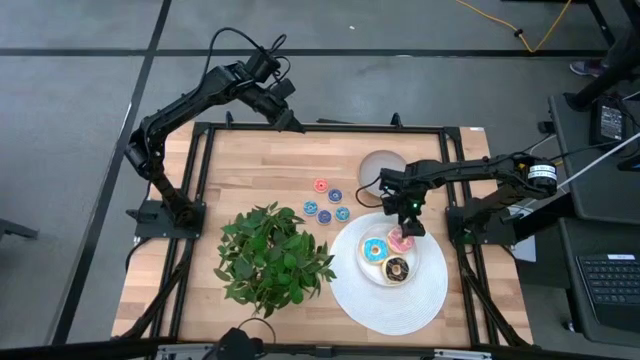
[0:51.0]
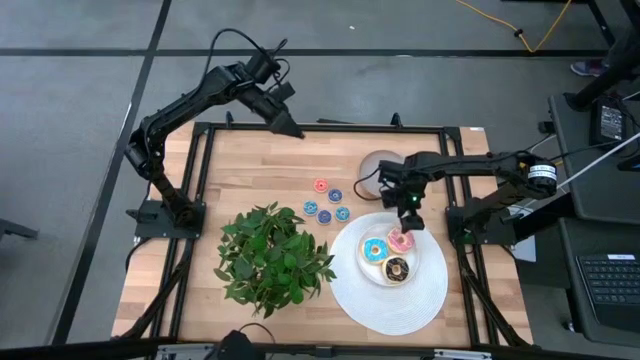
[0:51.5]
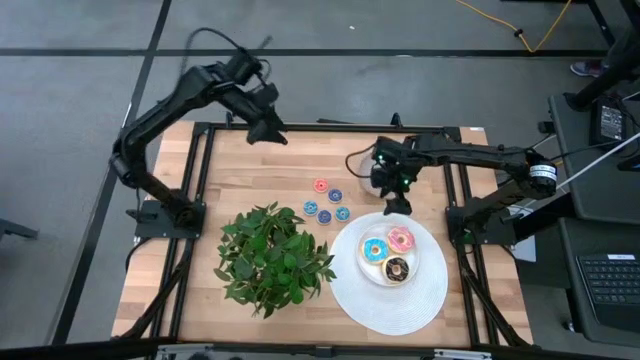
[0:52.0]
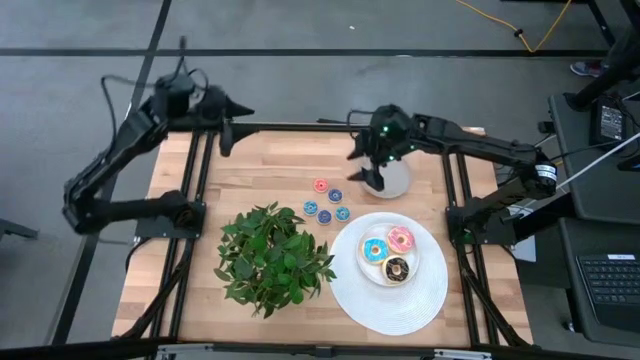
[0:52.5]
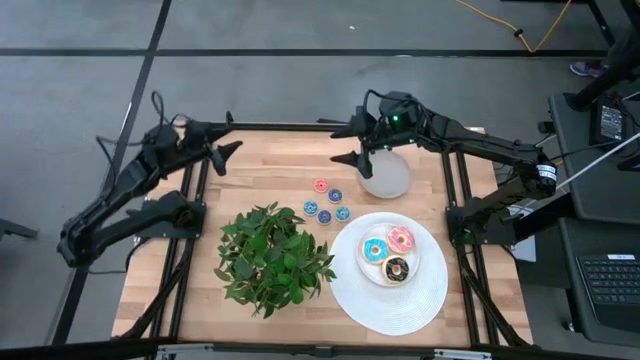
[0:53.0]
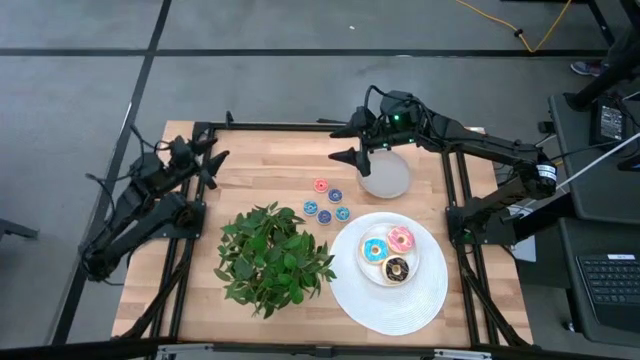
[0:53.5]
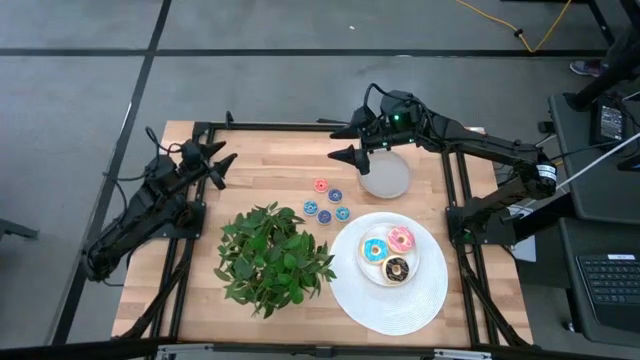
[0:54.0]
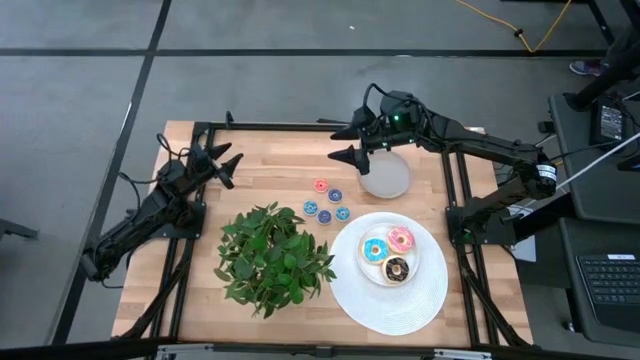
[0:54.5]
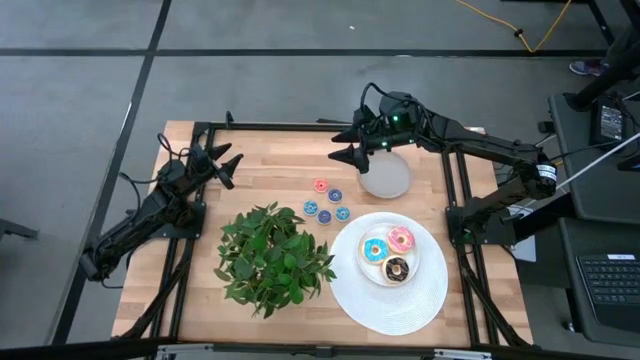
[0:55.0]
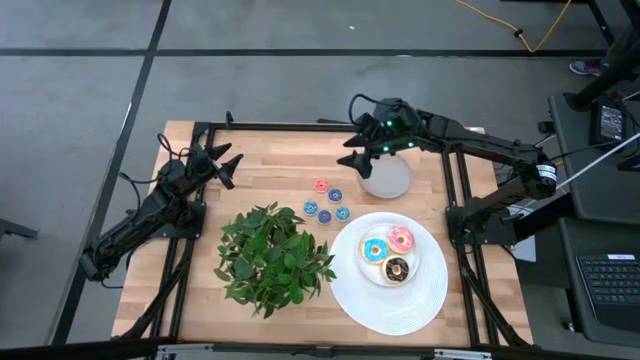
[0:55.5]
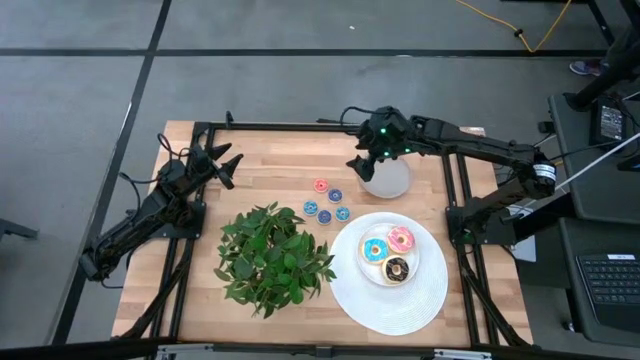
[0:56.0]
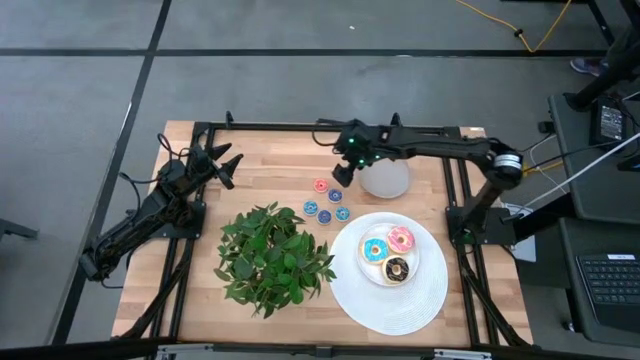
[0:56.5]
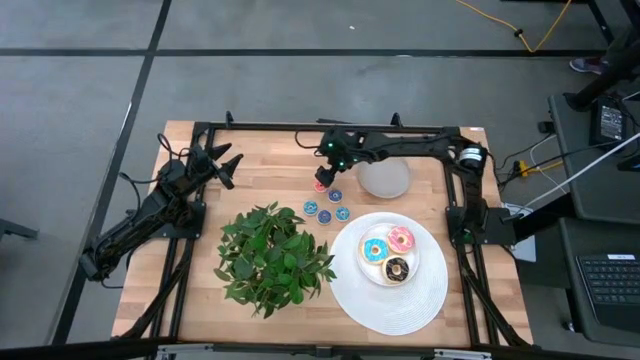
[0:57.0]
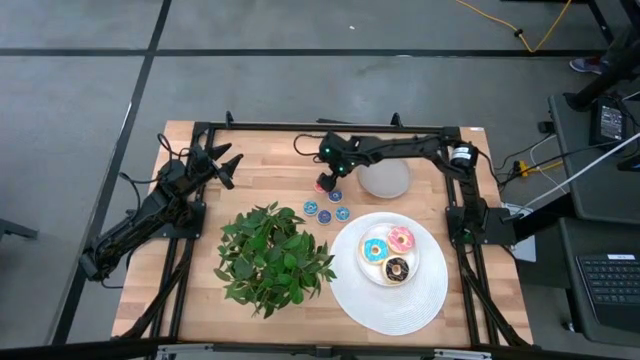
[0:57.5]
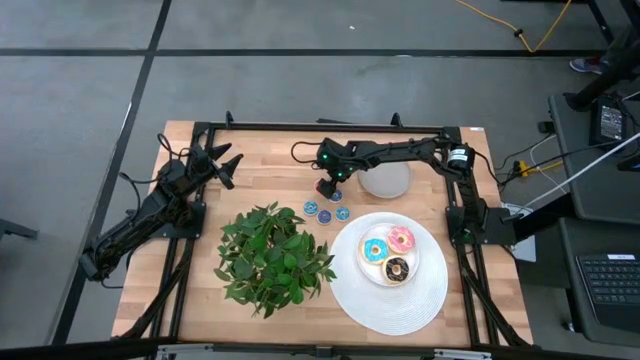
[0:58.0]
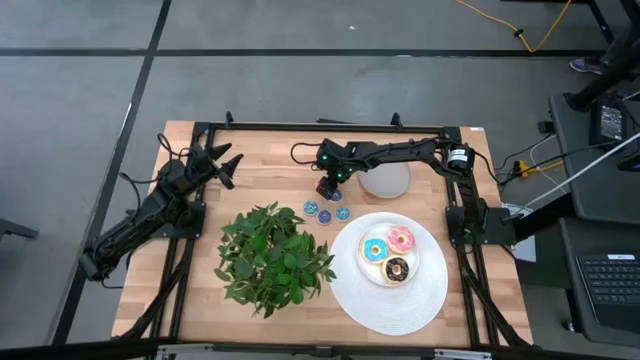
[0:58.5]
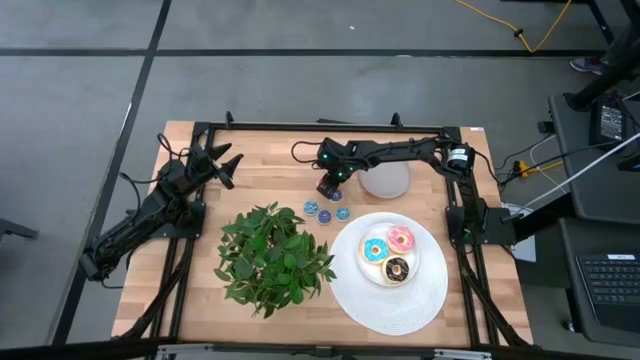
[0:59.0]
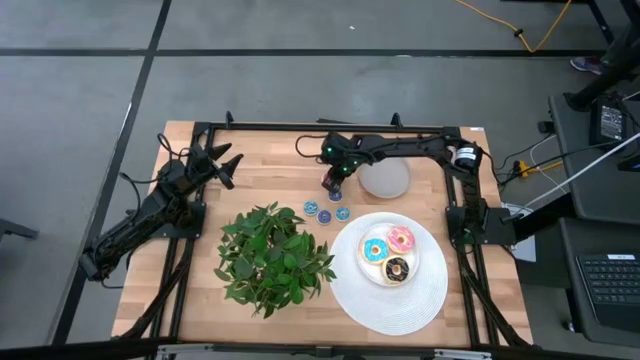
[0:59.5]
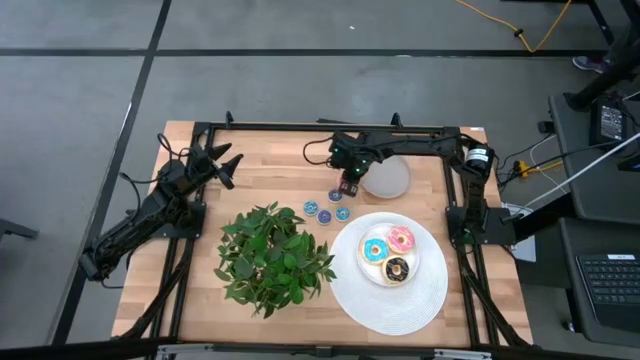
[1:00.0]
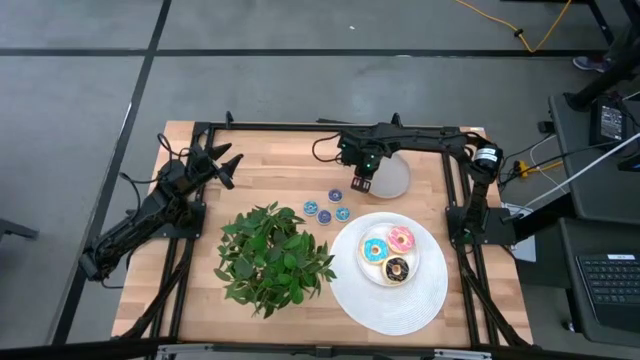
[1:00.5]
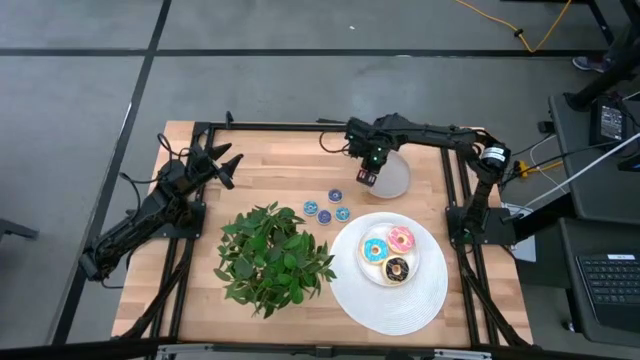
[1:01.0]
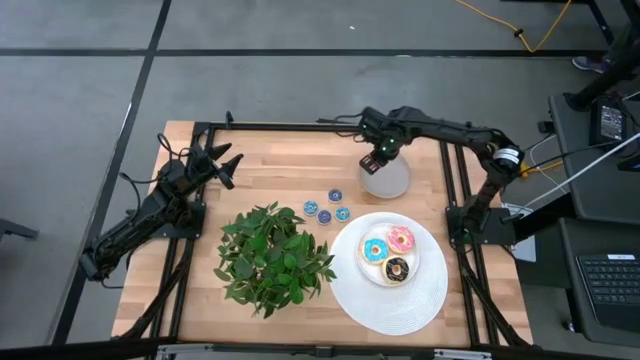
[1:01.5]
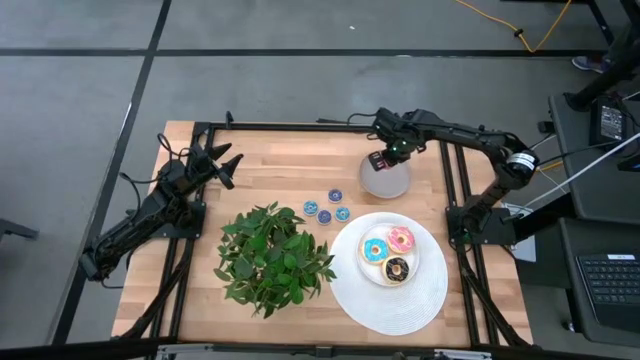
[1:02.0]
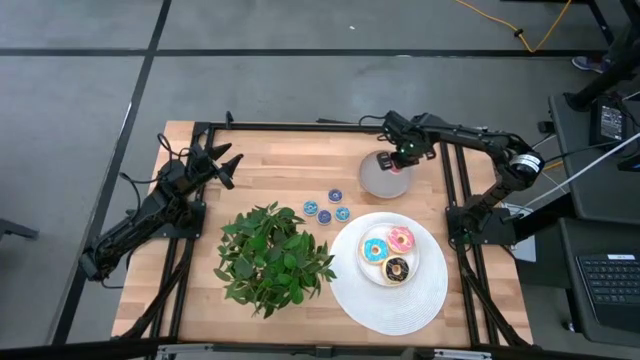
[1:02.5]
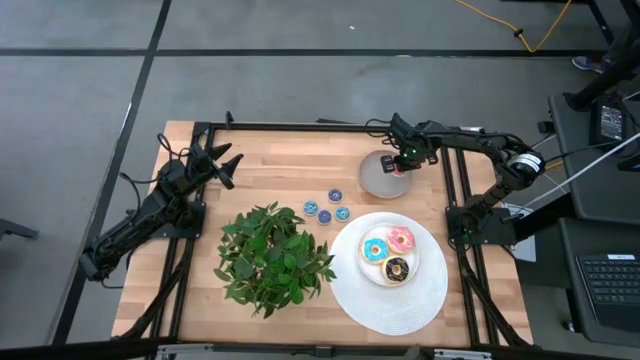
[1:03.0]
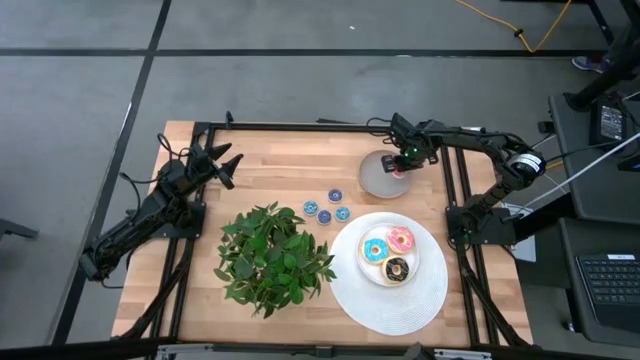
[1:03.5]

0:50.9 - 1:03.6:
Task: Pick & Place donuts
Put the small pink donut onto the gray plate

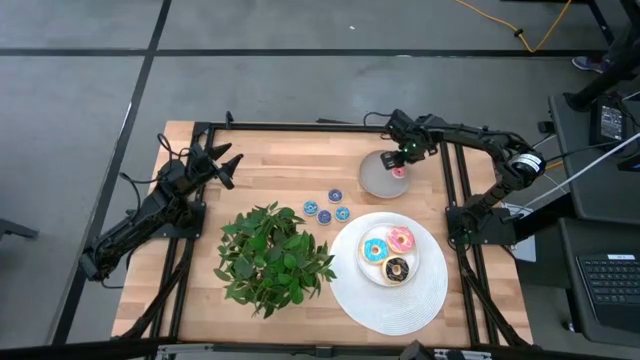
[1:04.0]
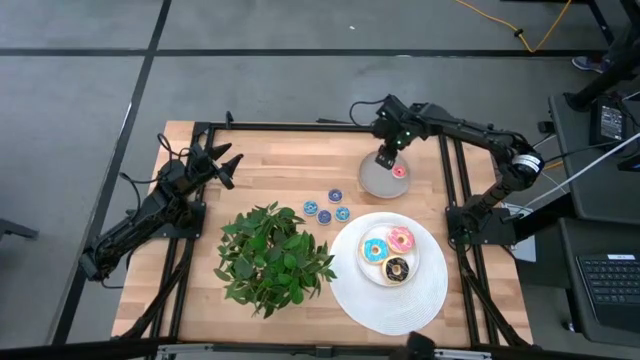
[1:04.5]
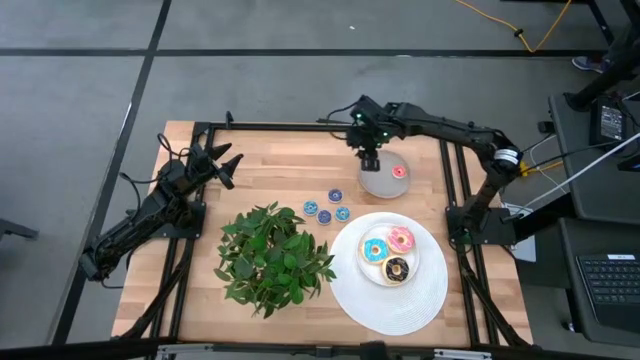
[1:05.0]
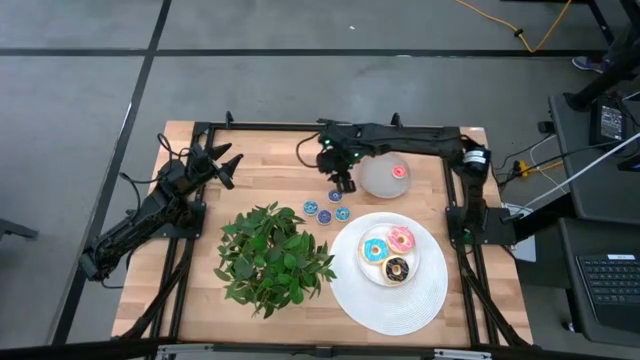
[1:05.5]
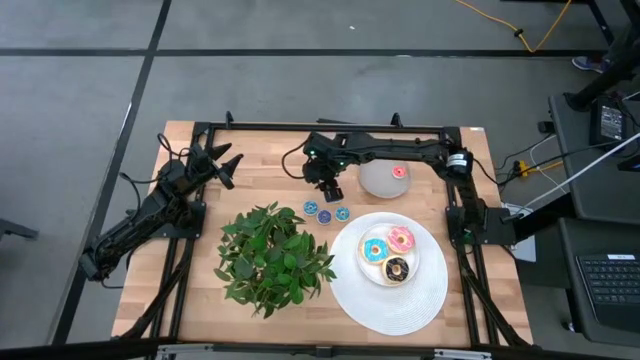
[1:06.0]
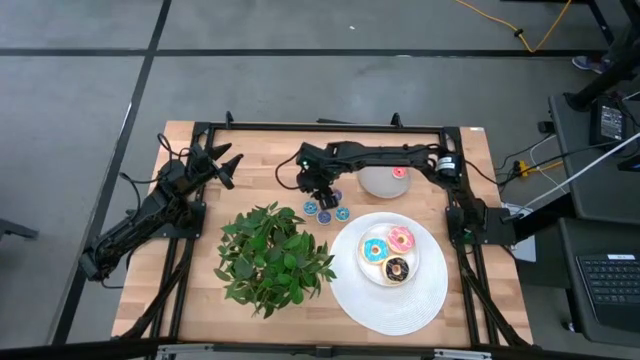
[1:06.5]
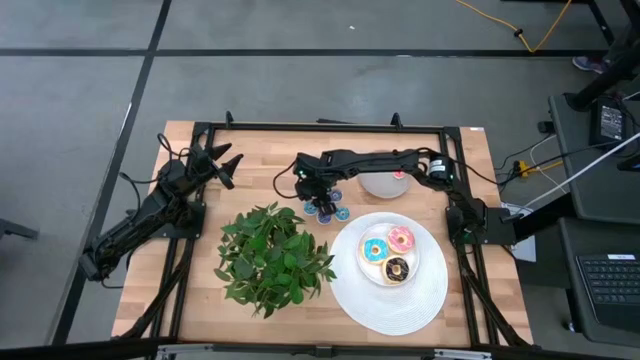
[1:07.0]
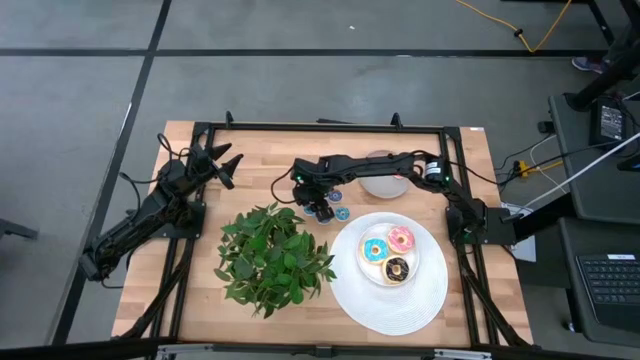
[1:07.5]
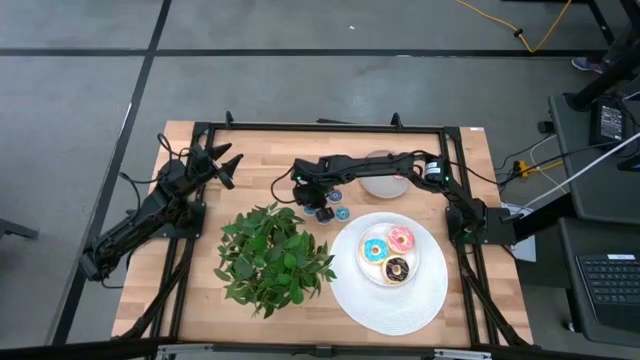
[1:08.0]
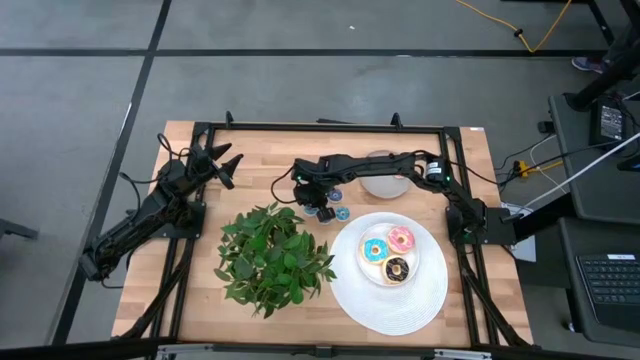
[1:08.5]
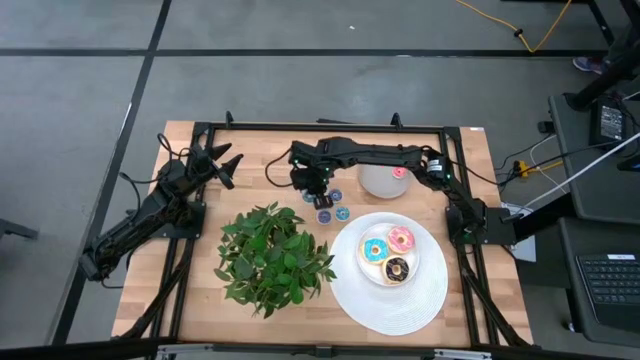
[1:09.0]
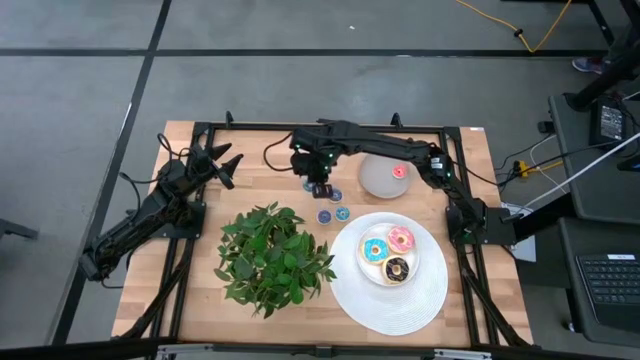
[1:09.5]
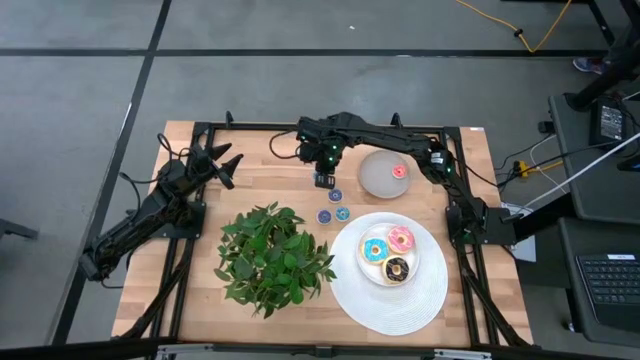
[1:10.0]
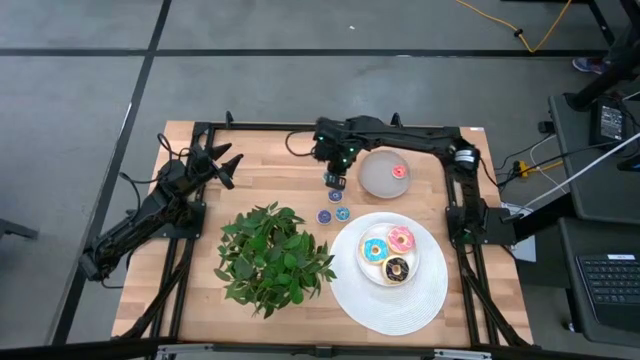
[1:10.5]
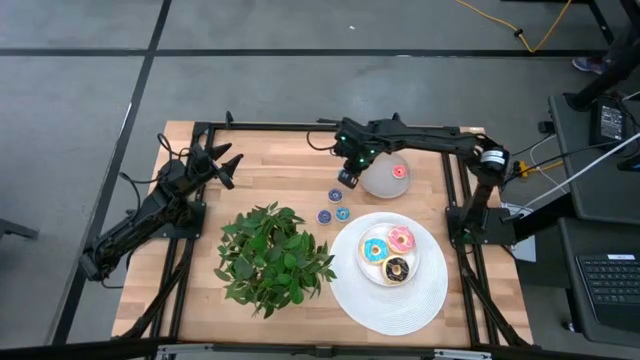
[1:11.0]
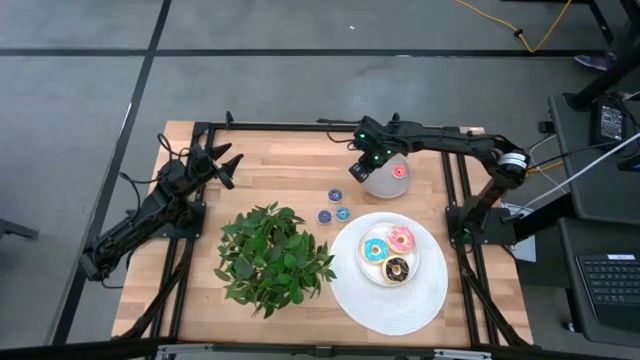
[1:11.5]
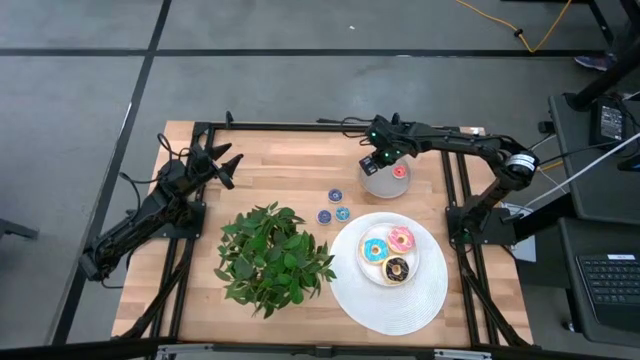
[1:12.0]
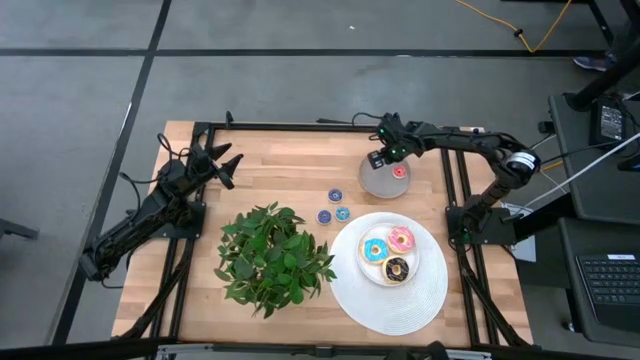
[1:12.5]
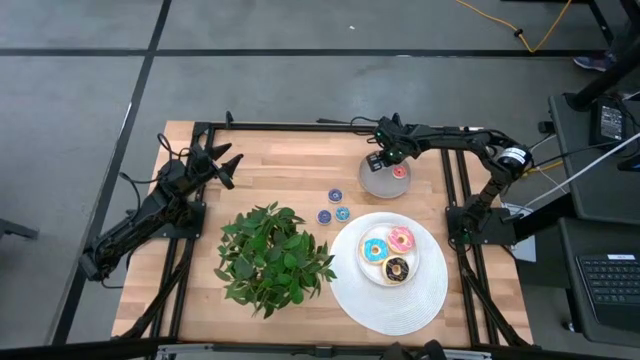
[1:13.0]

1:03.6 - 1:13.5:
Put the left small blue donut onto the gray plate
